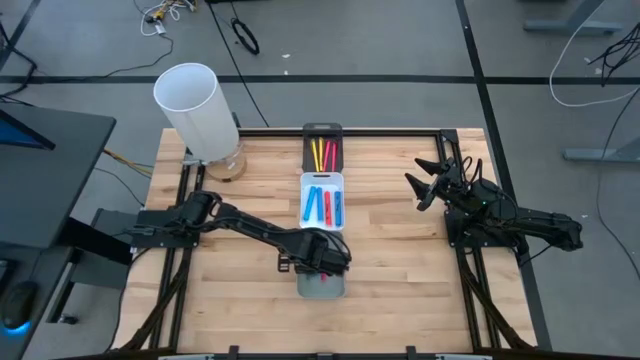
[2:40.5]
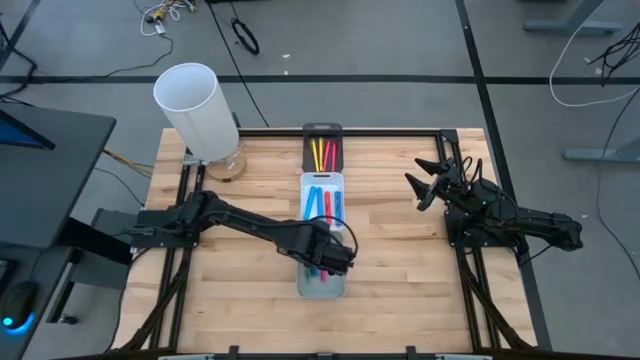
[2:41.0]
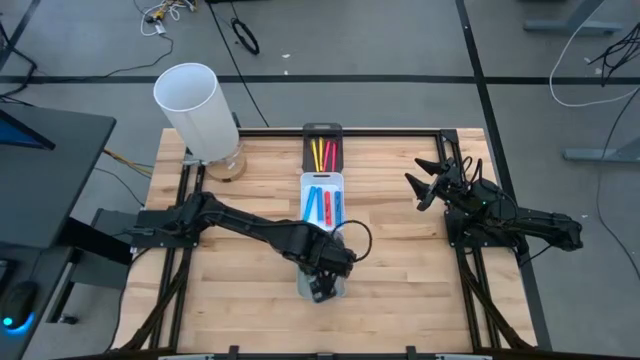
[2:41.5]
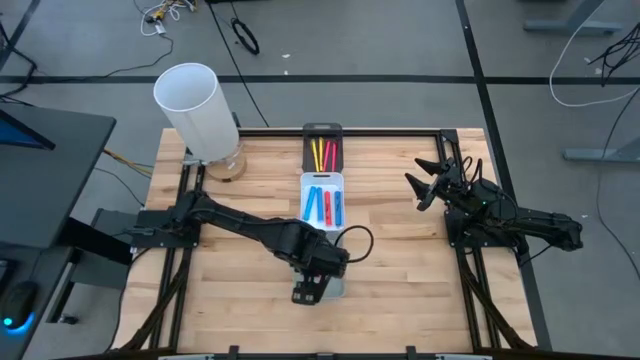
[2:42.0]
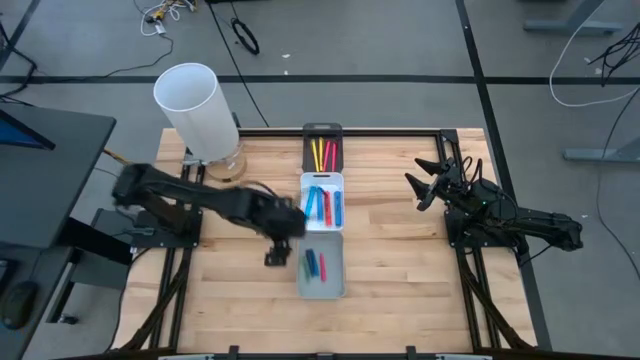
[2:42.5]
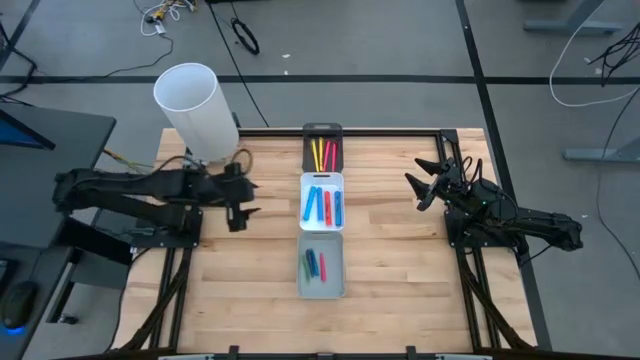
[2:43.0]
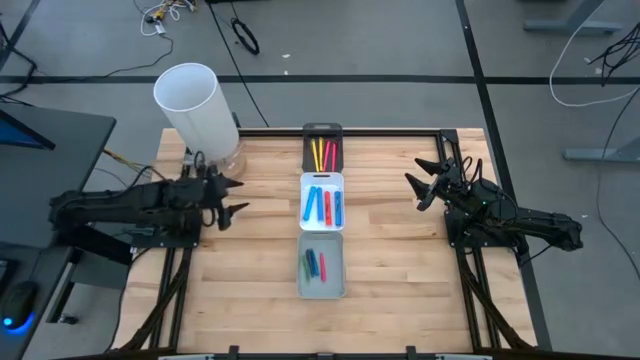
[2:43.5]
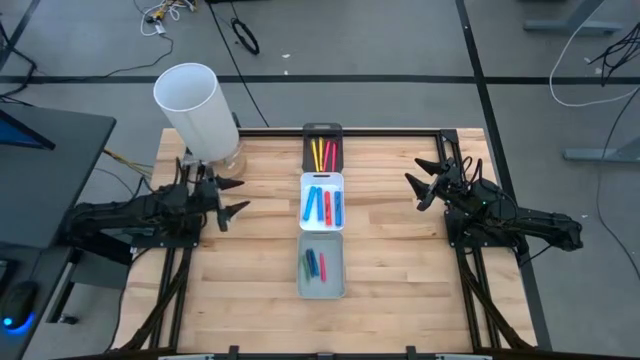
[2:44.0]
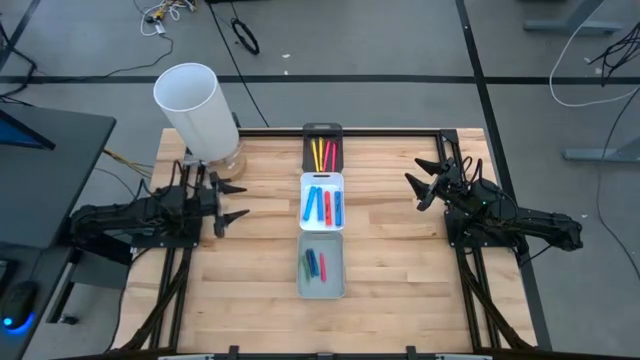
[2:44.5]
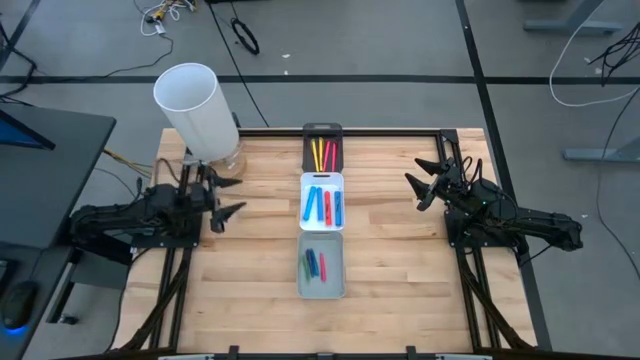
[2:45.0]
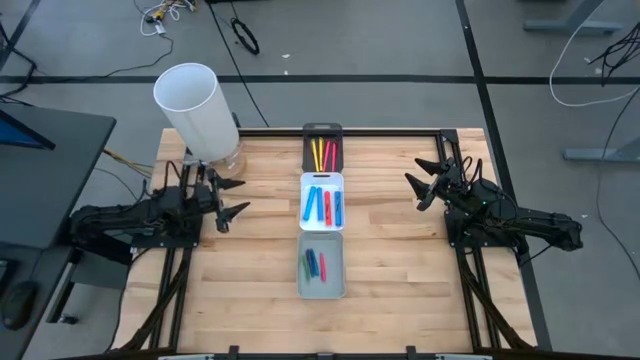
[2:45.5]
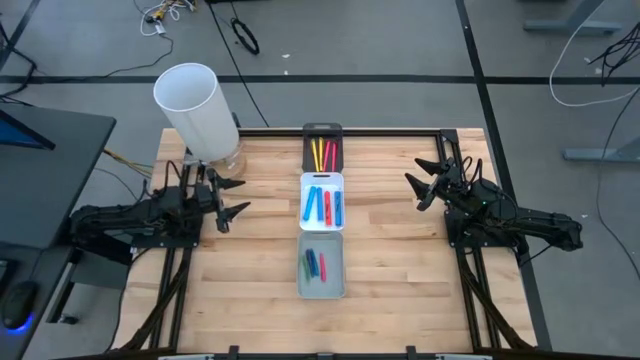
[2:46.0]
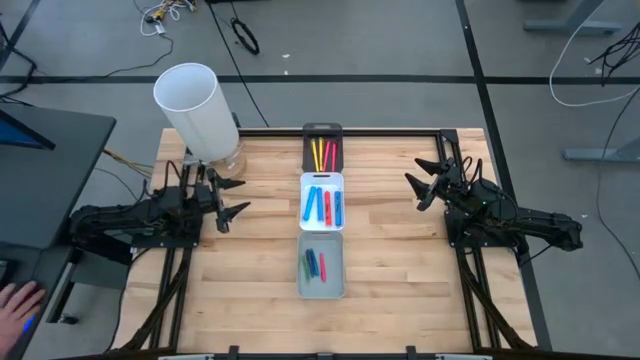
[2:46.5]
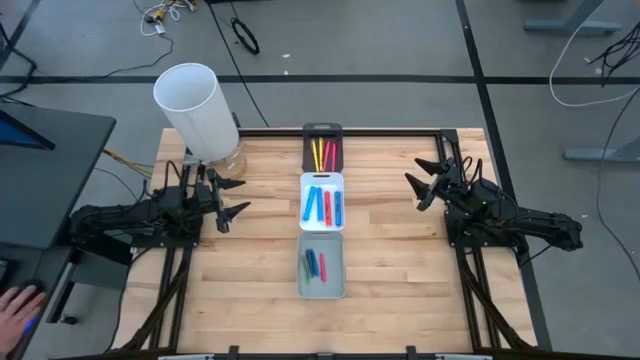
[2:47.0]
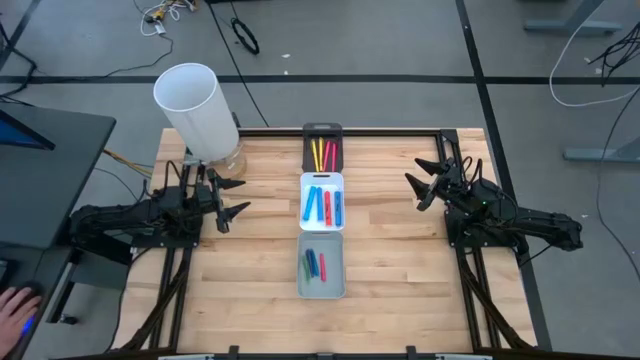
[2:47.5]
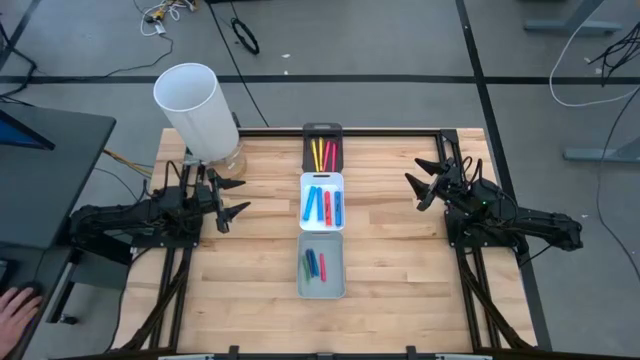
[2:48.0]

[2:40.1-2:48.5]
Task: Pick & Place Markers
Return to Home Position

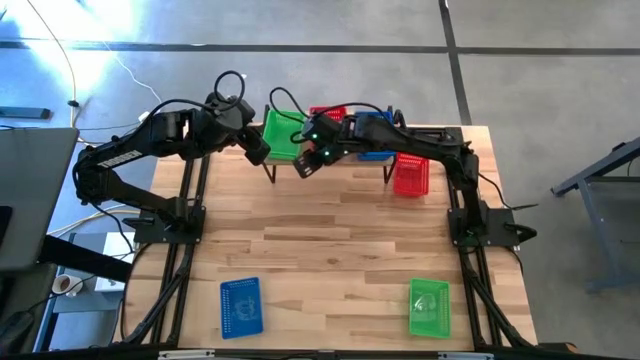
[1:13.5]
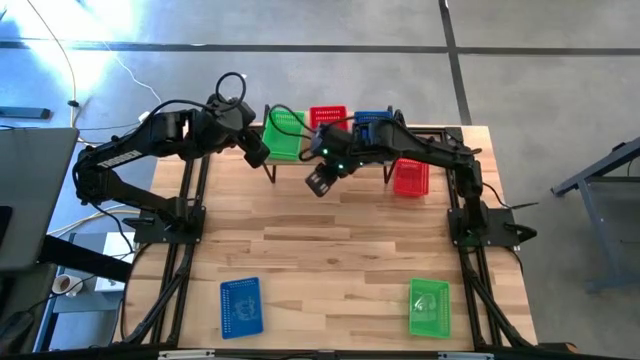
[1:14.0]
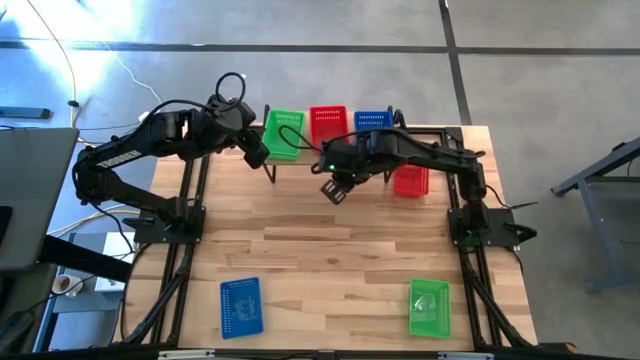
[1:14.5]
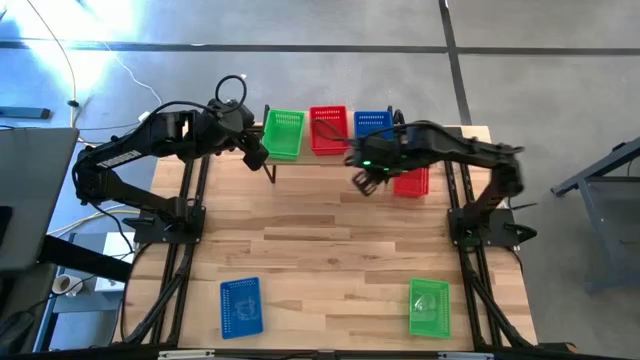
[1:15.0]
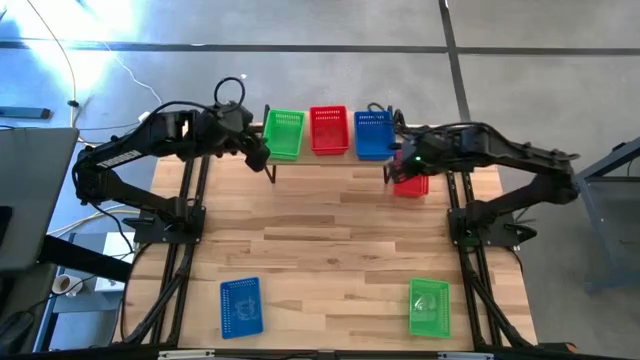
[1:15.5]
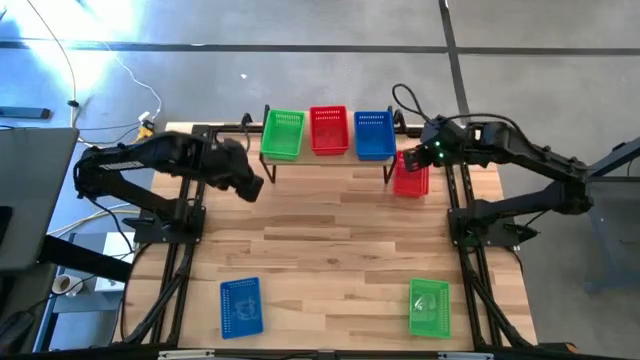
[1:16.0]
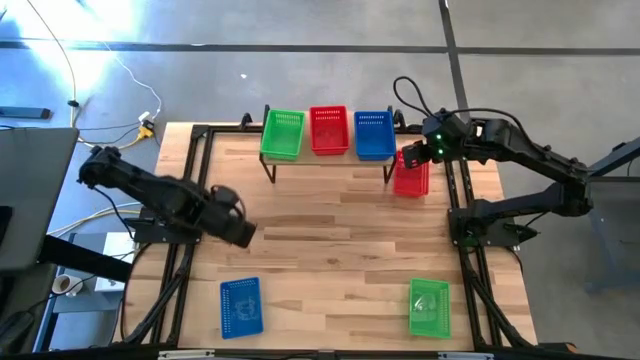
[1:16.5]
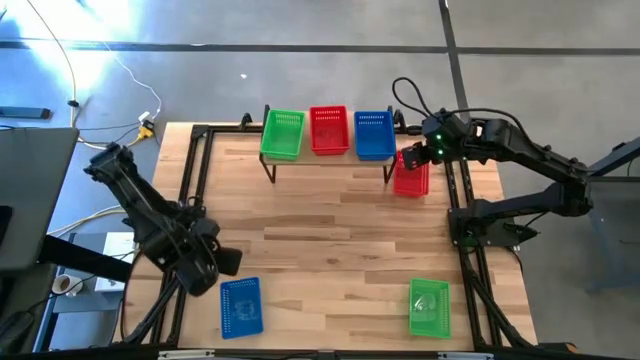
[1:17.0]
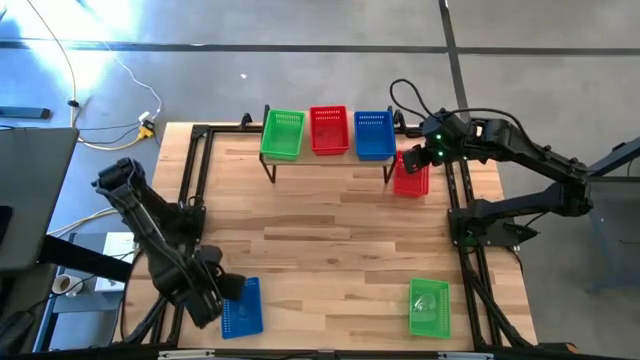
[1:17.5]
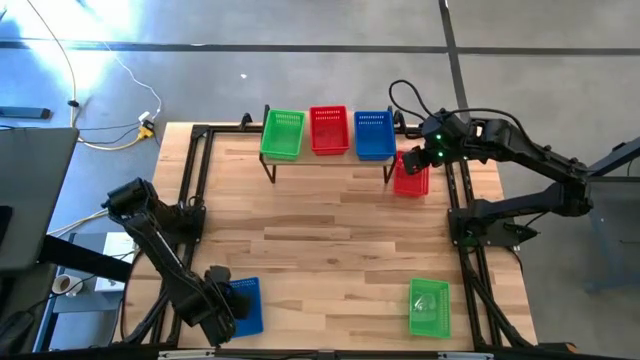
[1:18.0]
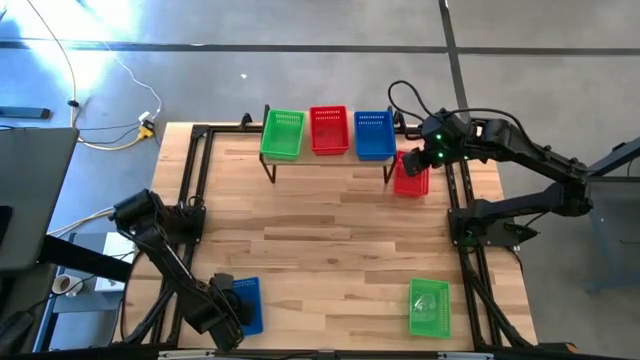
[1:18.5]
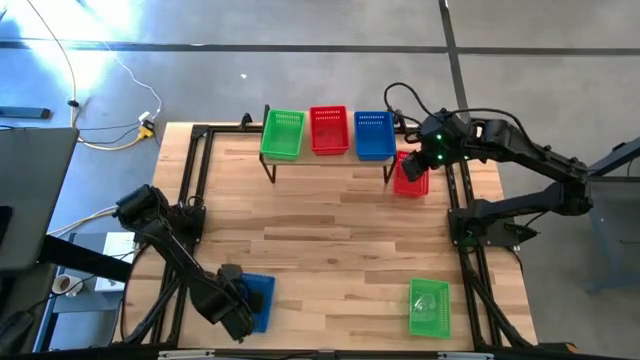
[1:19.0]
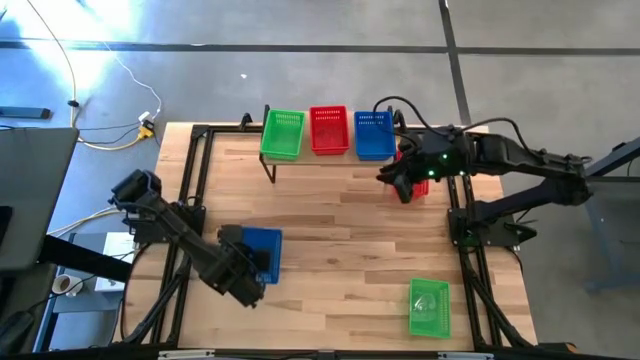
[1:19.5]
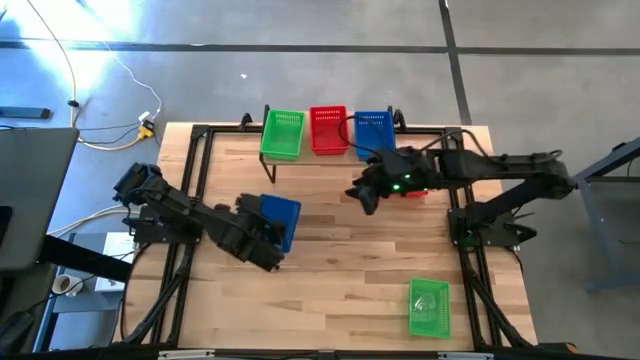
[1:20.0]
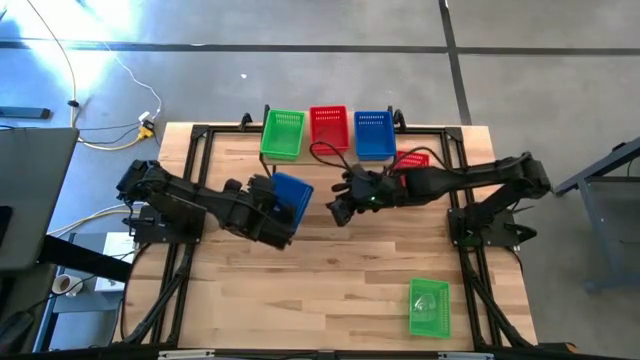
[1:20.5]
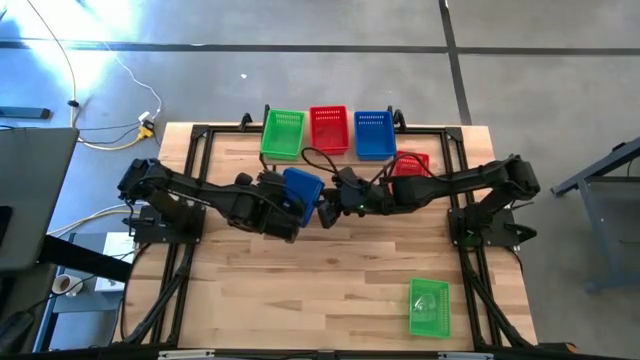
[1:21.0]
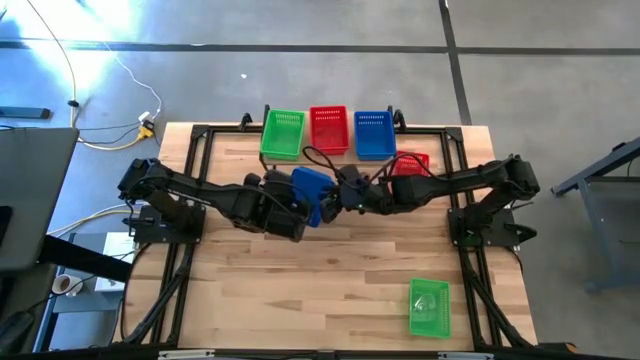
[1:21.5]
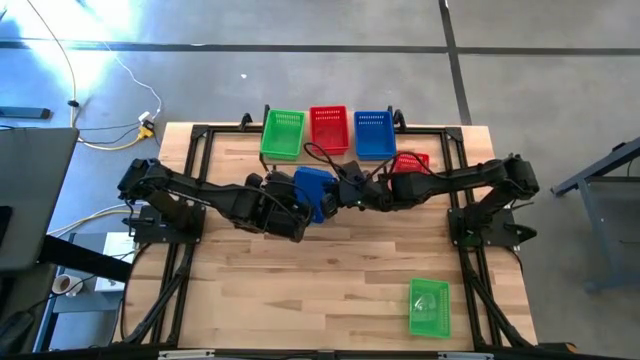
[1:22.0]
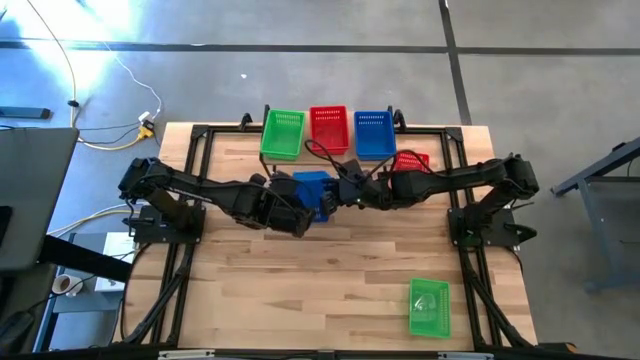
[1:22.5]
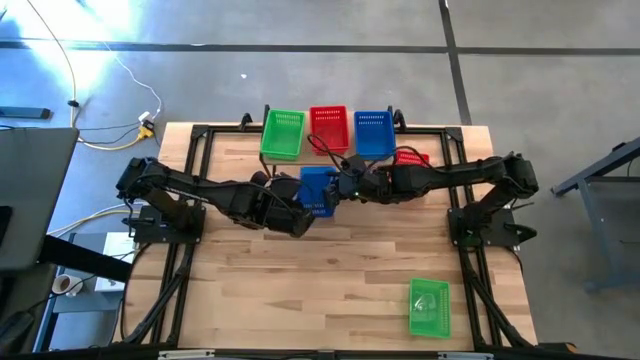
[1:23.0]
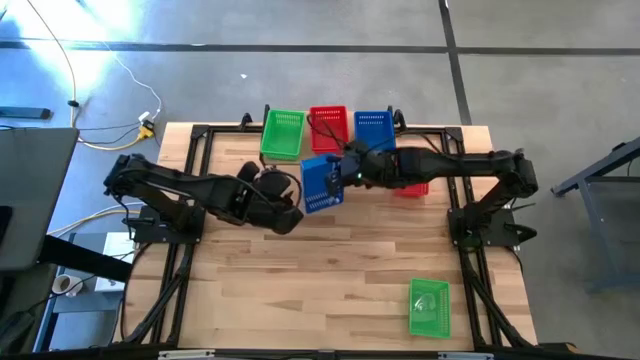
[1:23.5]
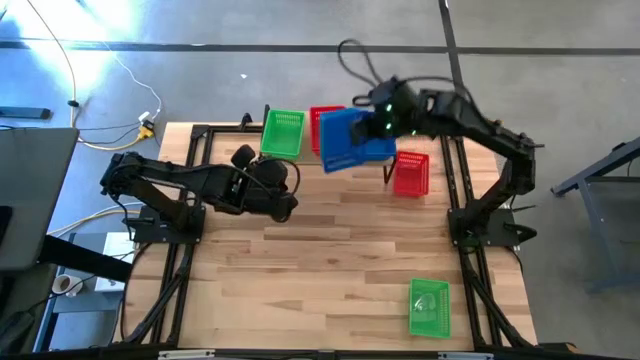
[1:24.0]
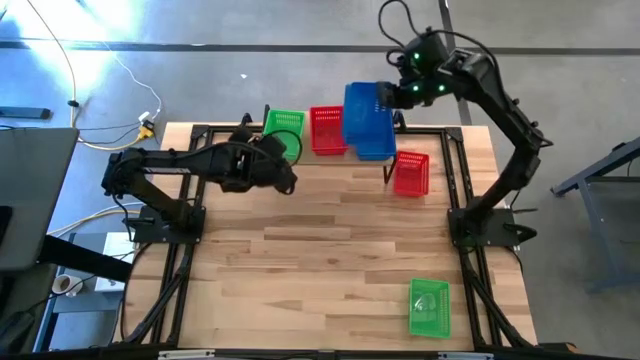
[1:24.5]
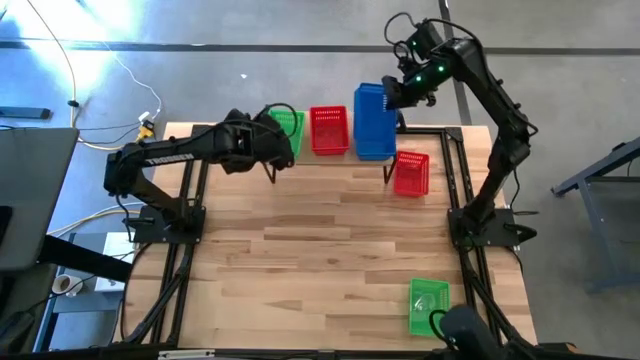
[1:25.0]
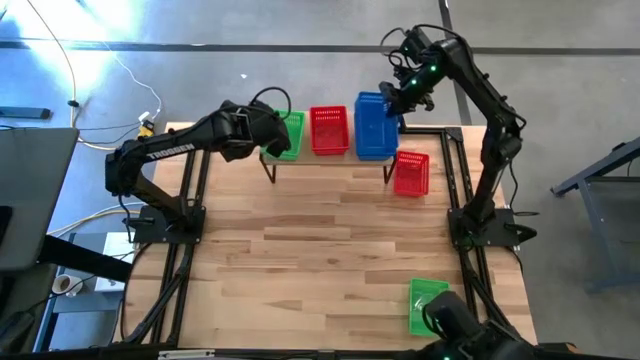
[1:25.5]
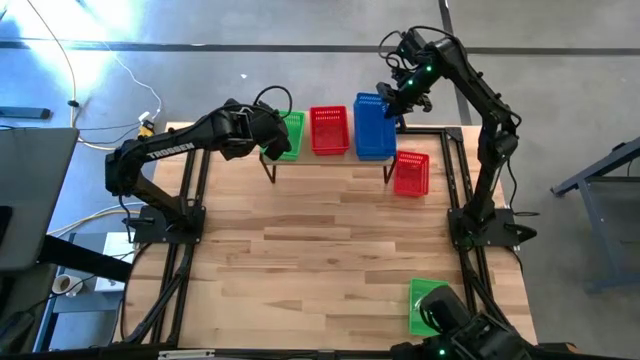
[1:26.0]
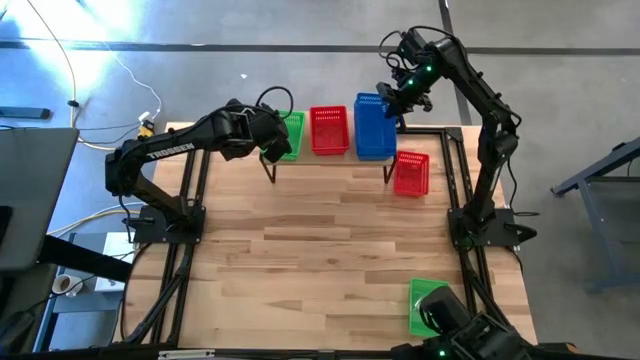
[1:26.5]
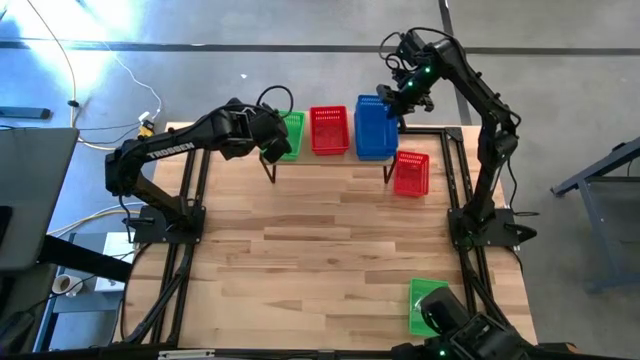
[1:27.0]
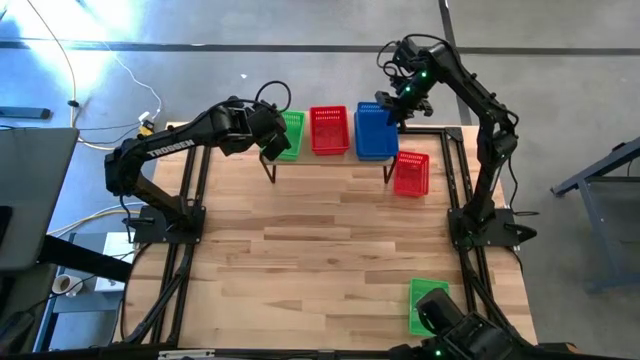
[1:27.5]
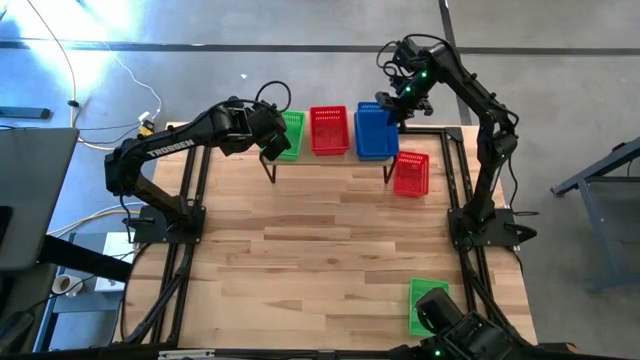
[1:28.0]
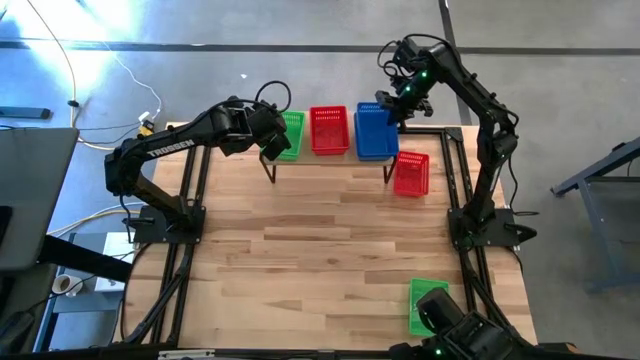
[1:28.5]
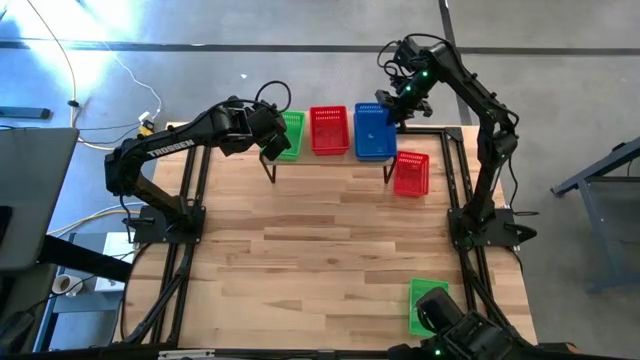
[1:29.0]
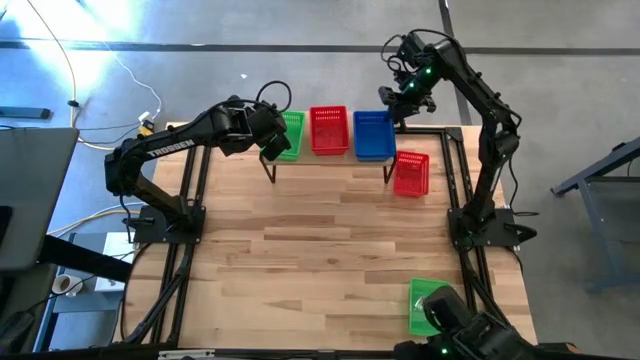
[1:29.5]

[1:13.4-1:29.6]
Task: Stack baskets on shelf by color
Stack the blue bin on top of the stacked blue bins on the shelf
